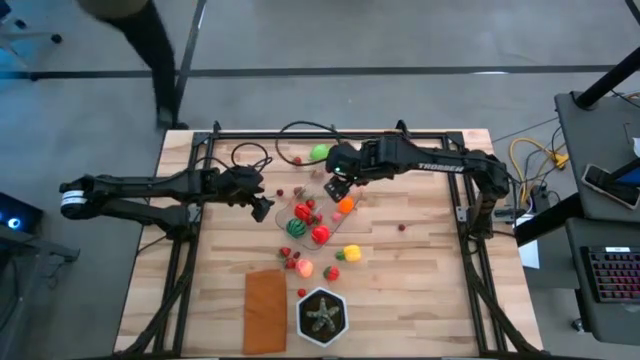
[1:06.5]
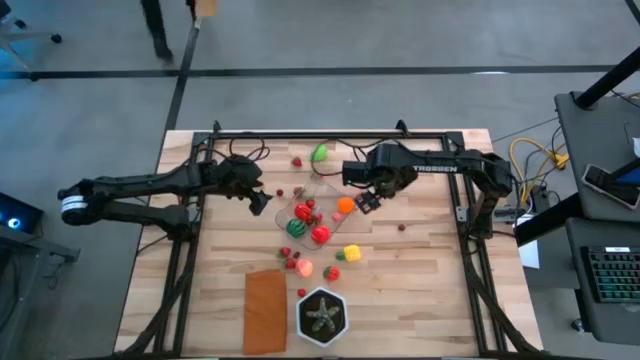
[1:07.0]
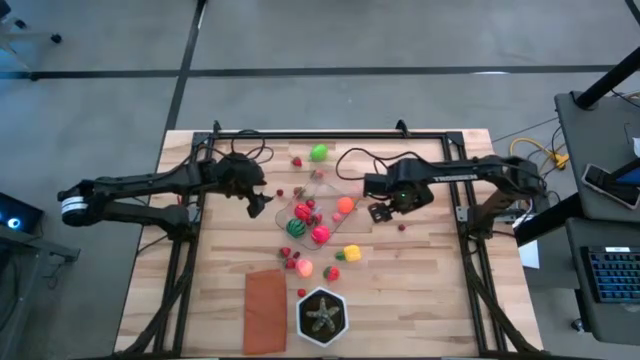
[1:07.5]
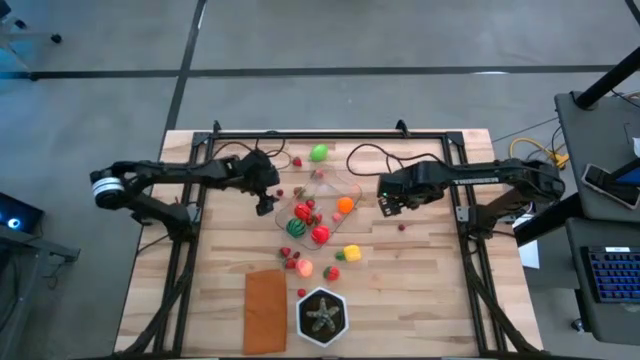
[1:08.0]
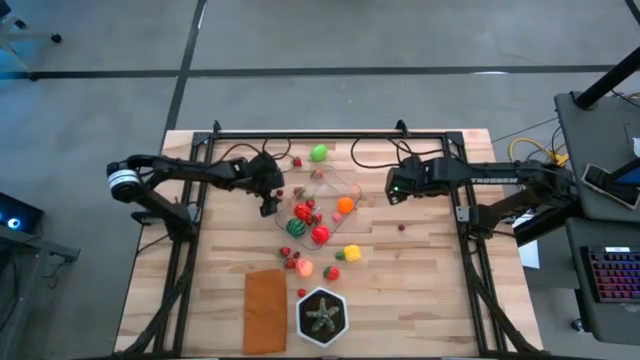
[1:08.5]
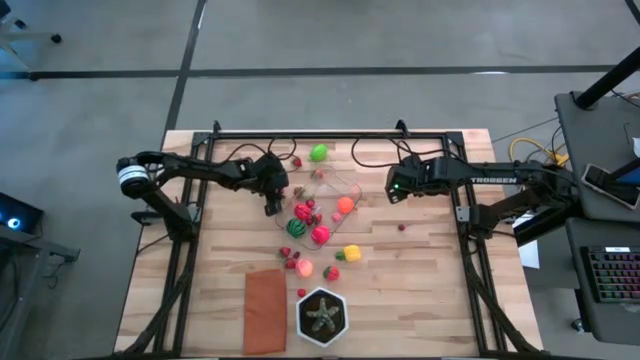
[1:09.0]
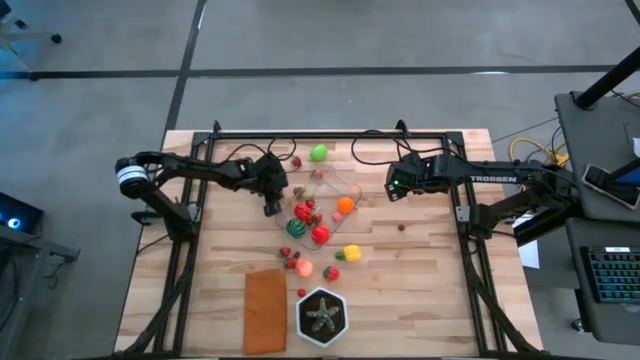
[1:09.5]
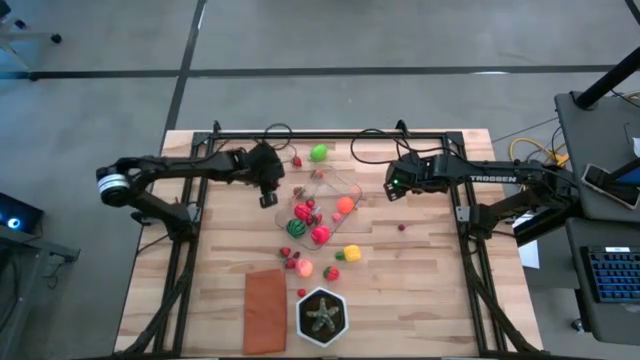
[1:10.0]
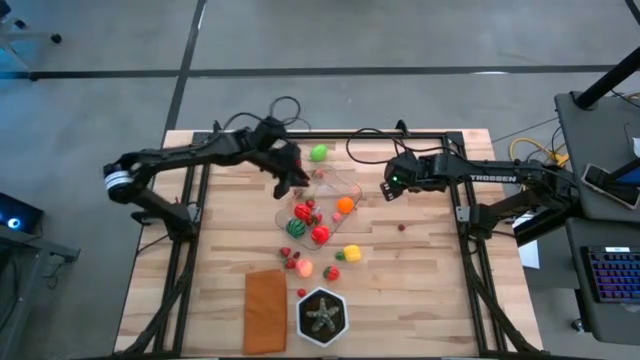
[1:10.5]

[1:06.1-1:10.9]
Task: Pick and placing Produce into tupperware
Put the red cherry into the transparent bin

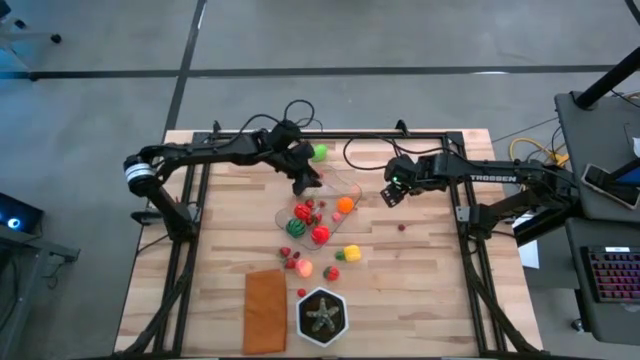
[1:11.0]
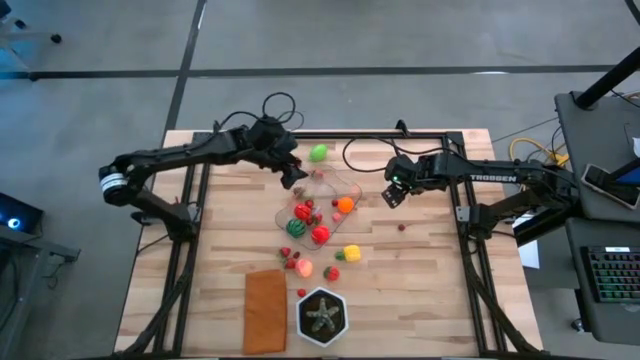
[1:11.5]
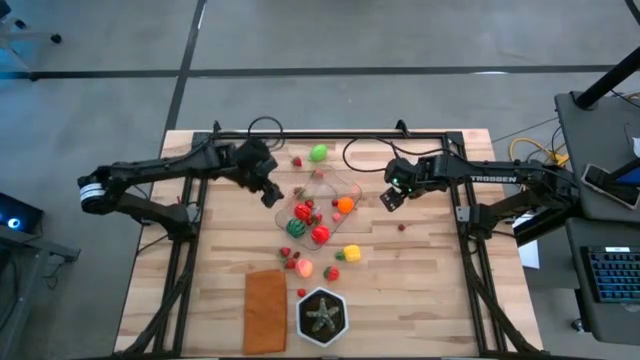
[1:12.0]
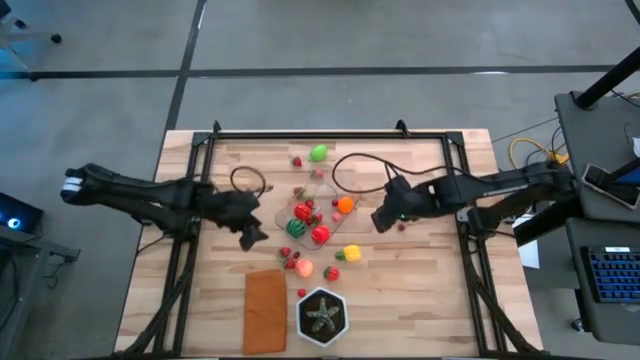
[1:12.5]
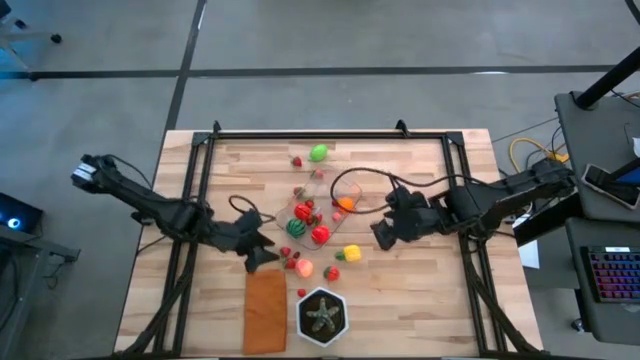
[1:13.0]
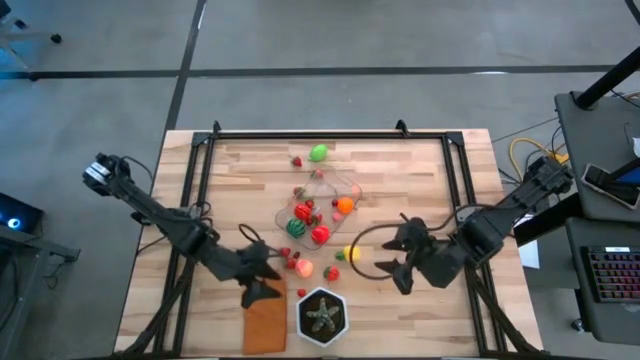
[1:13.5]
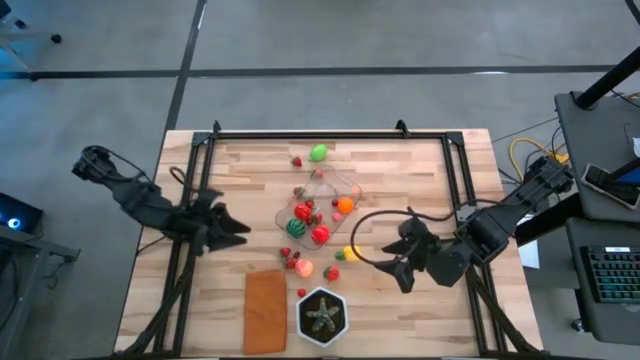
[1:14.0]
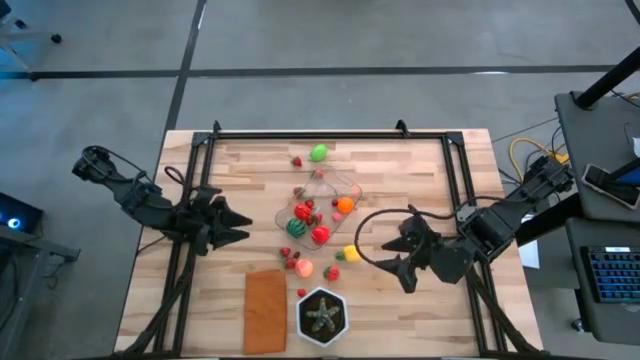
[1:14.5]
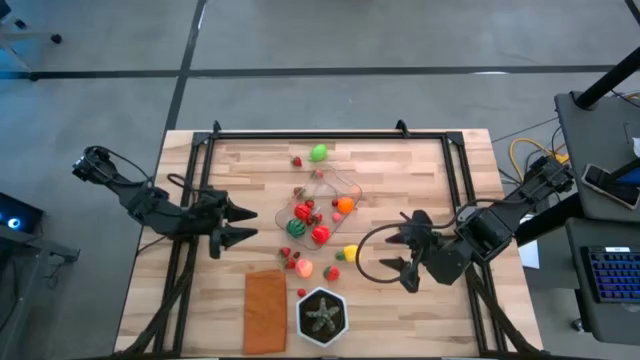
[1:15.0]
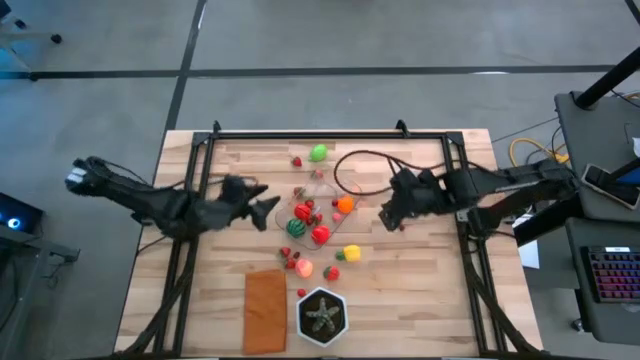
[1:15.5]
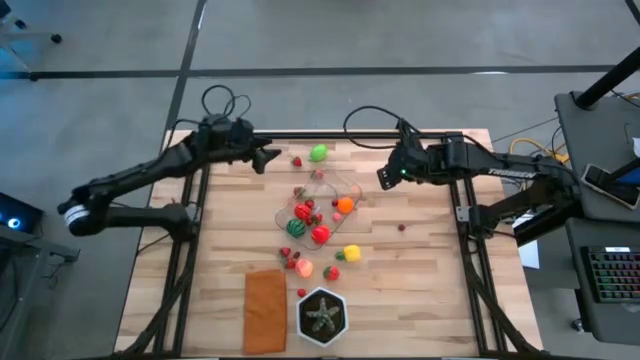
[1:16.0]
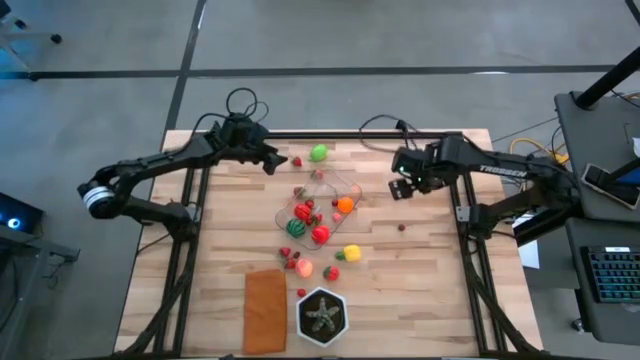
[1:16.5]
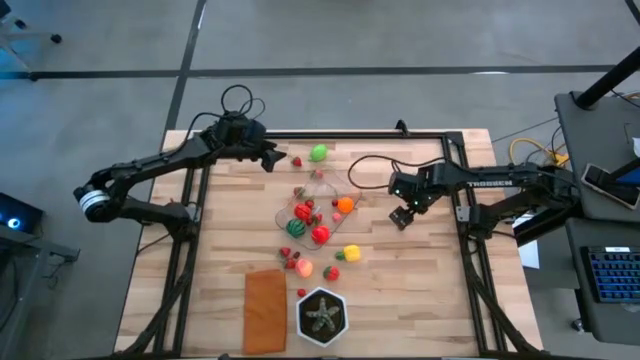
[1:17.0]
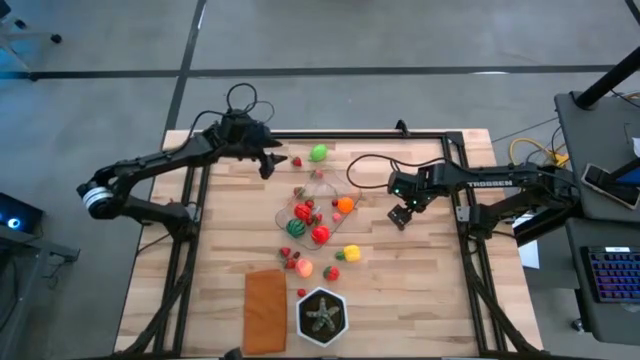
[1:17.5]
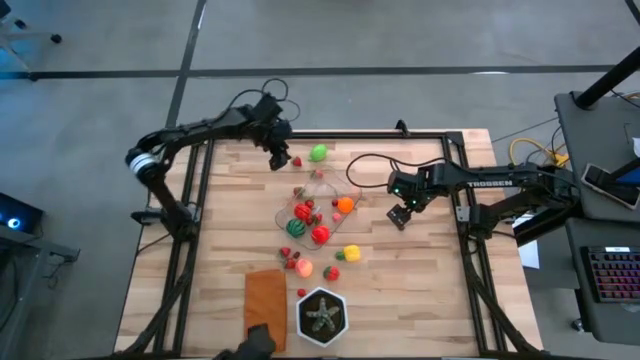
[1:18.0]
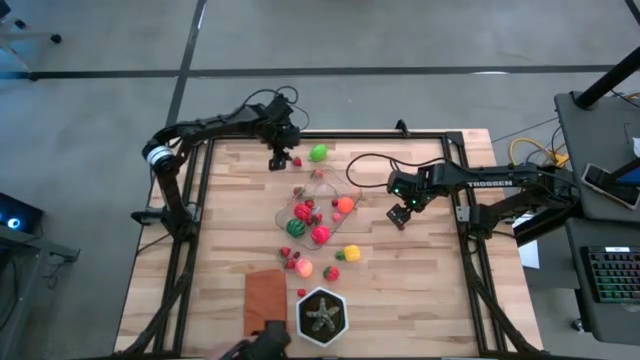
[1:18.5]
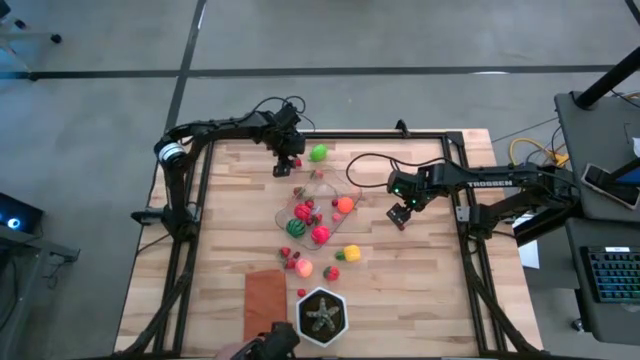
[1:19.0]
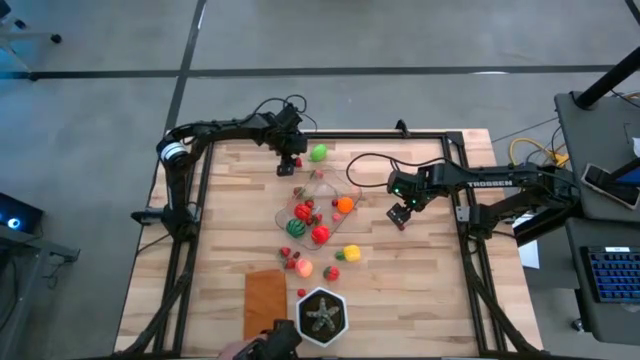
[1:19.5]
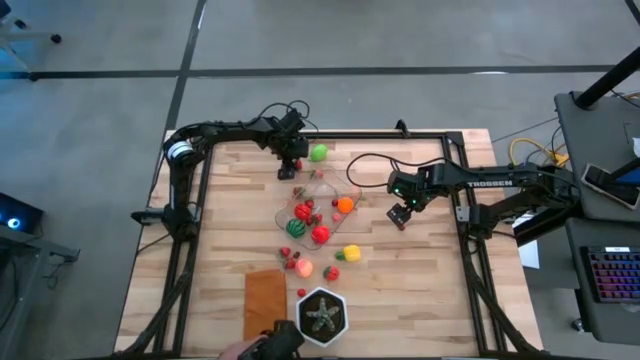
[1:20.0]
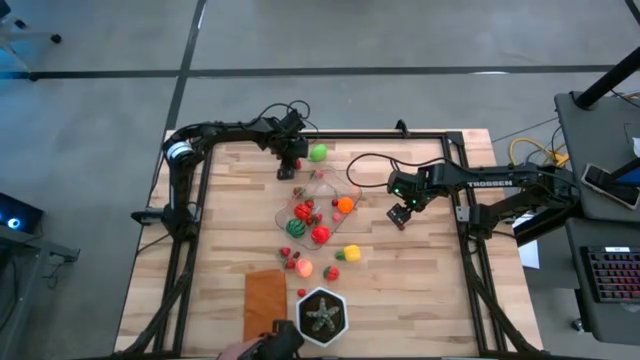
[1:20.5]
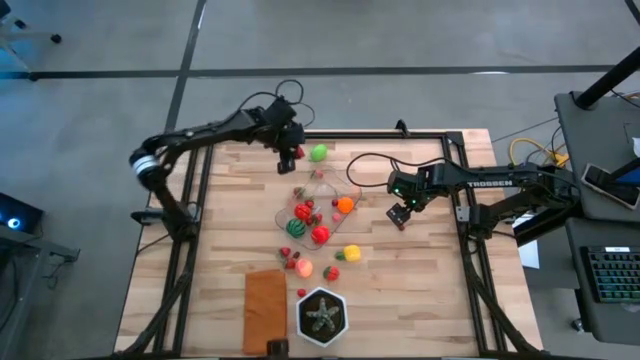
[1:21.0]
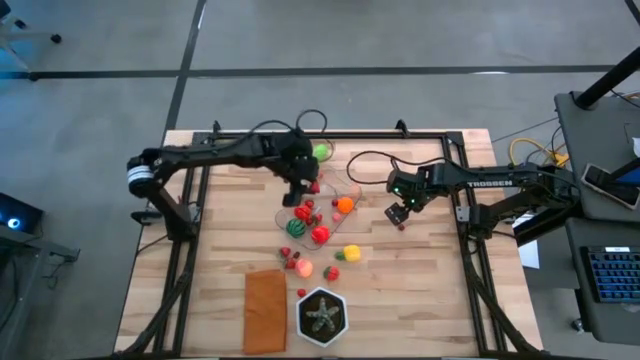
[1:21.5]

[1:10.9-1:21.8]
Put the red strawberry into the transparent bin

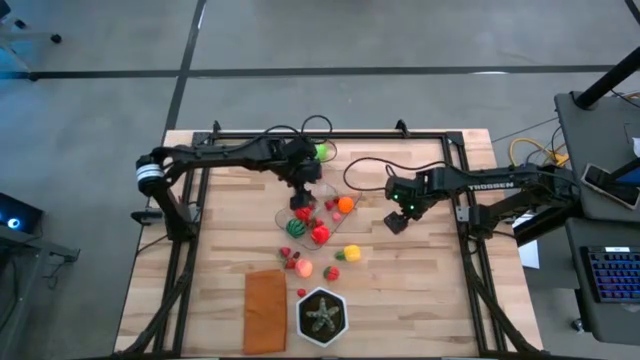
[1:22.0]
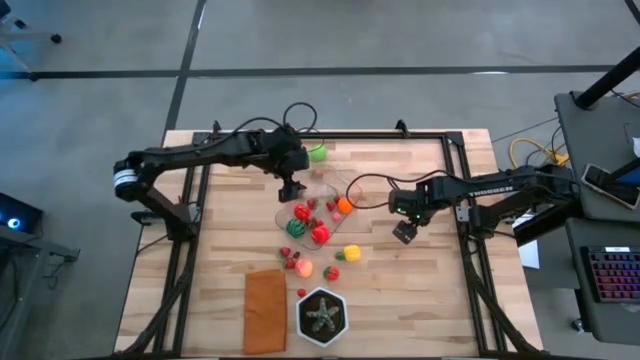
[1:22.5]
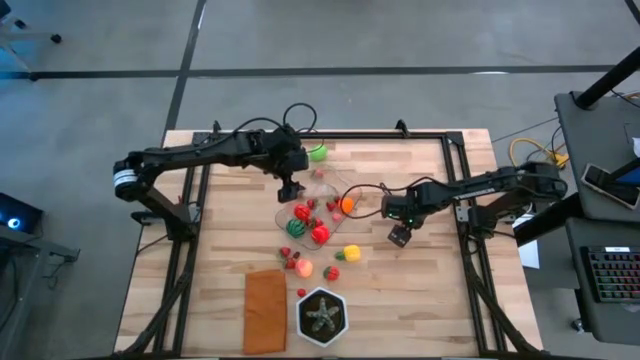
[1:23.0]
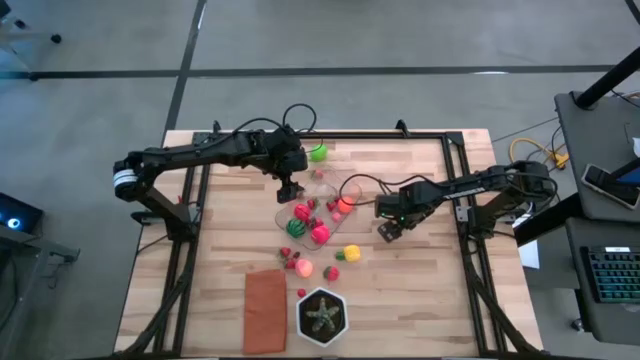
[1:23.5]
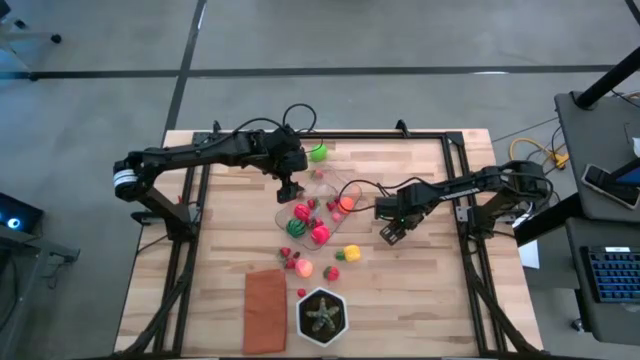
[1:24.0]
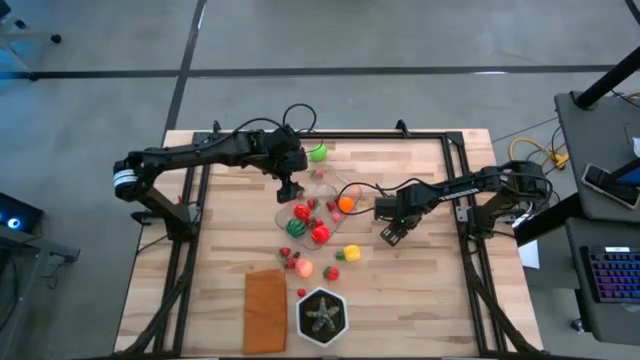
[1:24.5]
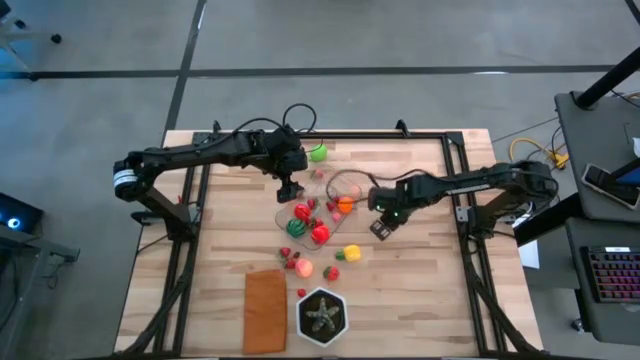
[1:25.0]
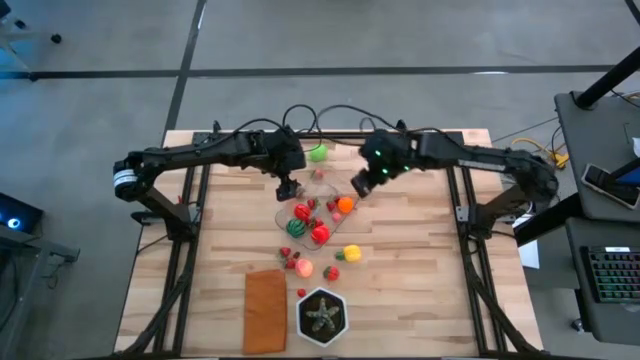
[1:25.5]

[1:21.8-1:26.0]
Put the red cherry into the transparent bin

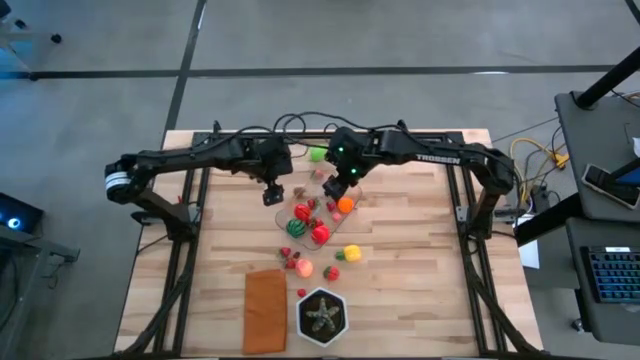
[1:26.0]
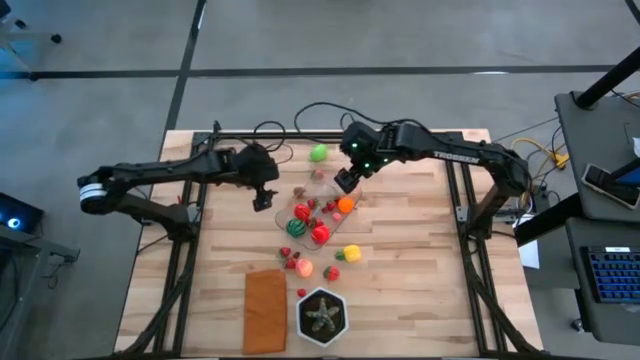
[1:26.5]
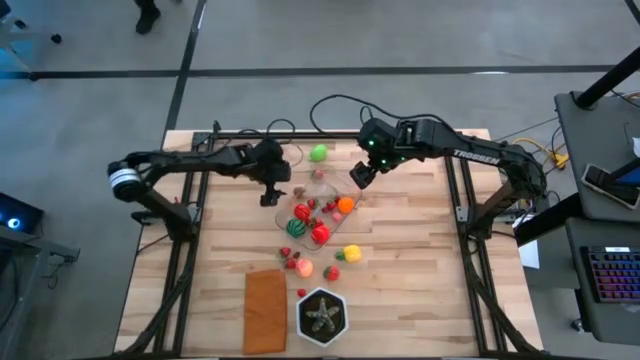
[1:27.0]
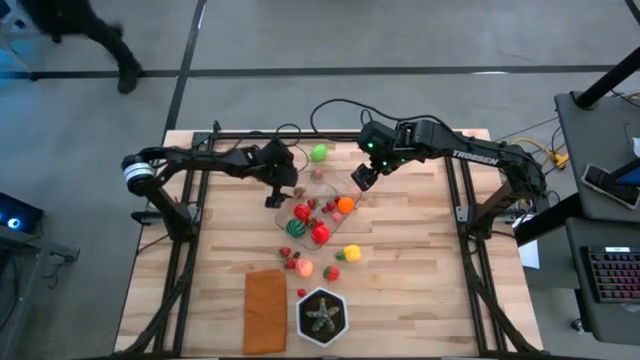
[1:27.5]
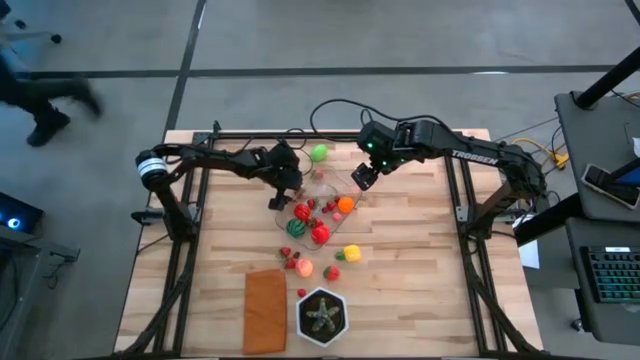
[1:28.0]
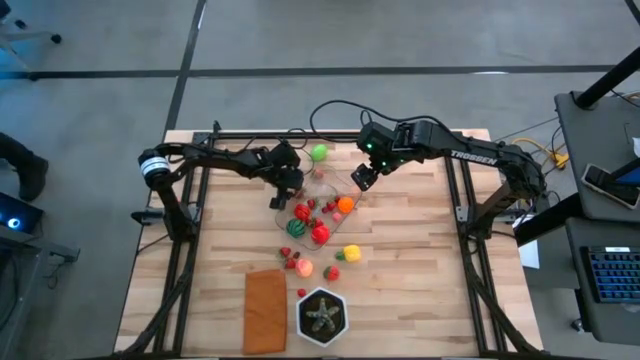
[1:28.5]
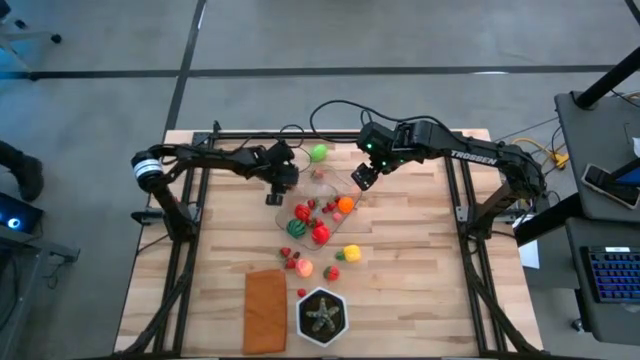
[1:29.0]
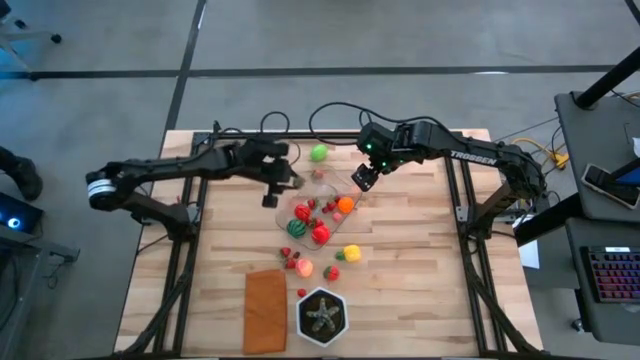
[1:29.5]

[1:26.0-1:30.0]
Put the red strawberry into the transparent bin
